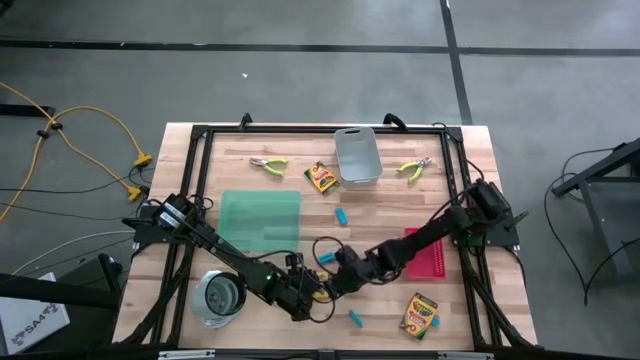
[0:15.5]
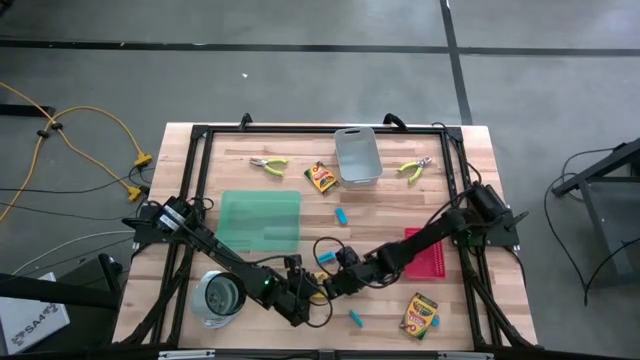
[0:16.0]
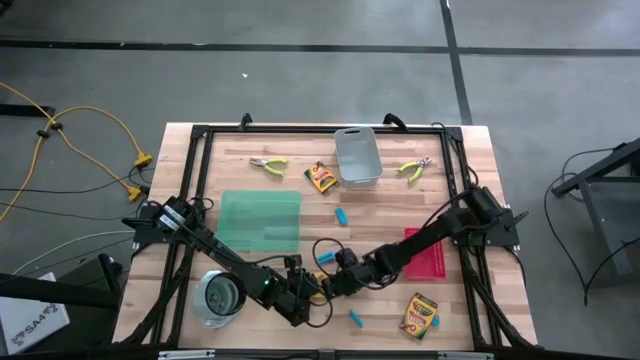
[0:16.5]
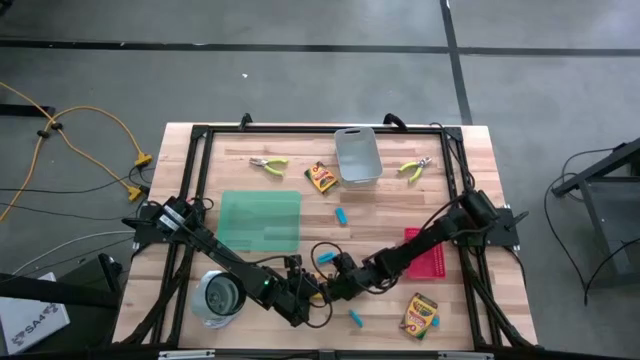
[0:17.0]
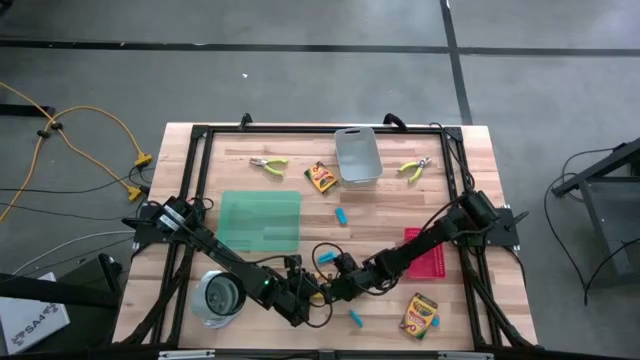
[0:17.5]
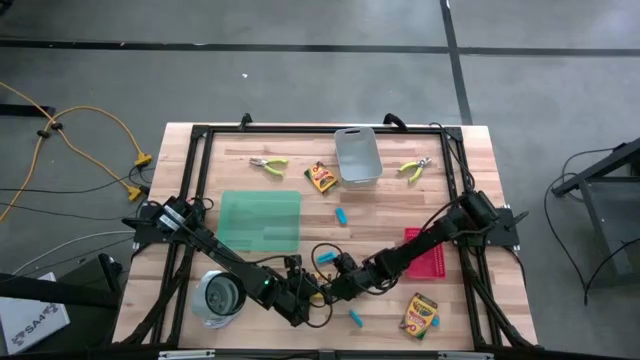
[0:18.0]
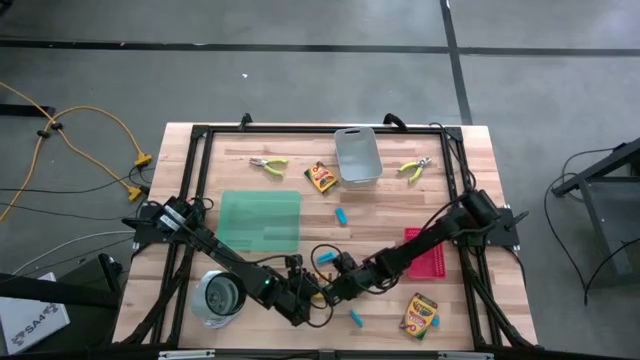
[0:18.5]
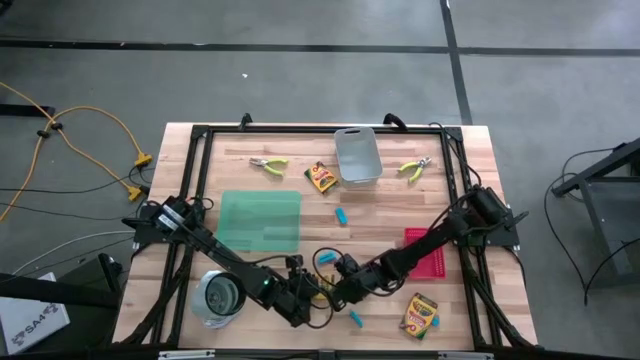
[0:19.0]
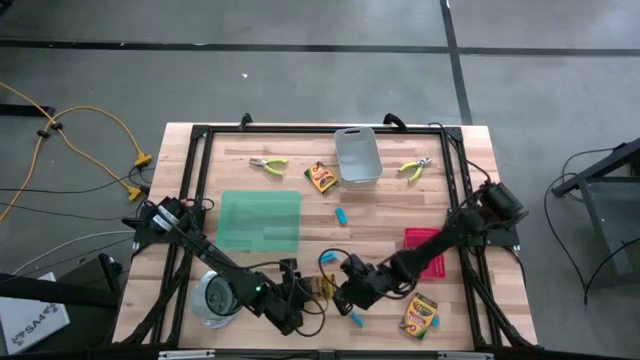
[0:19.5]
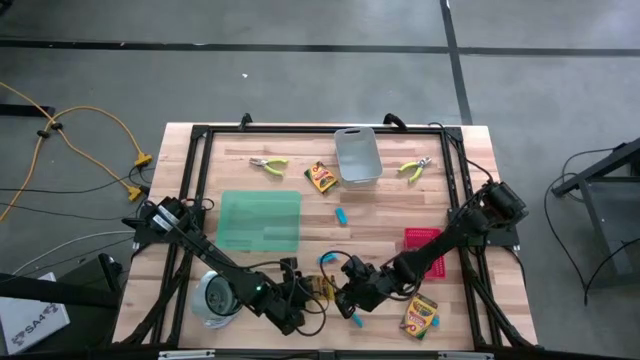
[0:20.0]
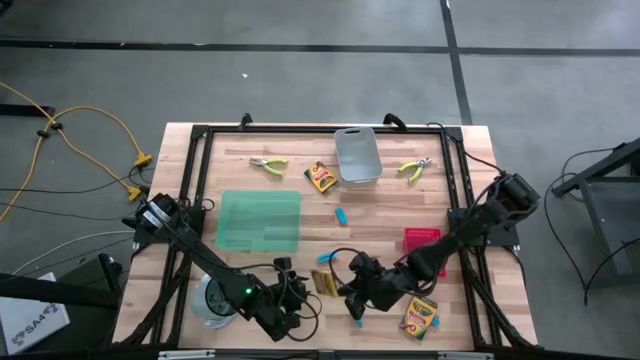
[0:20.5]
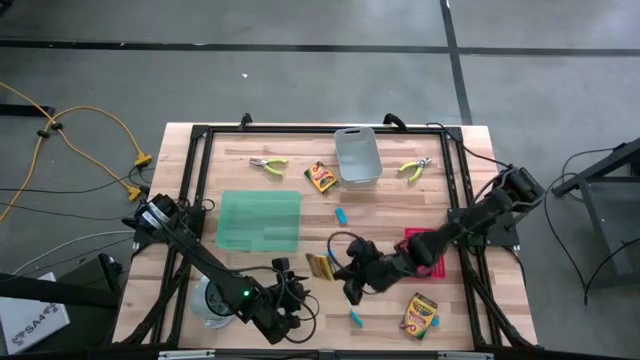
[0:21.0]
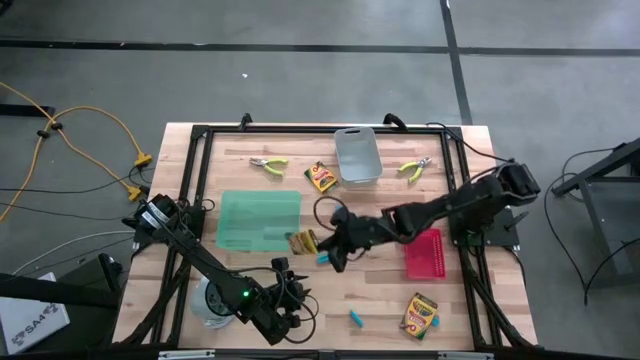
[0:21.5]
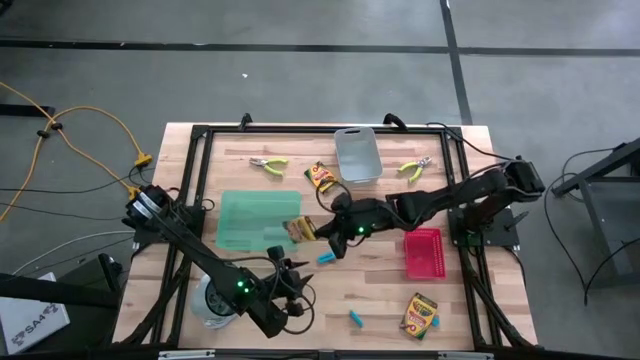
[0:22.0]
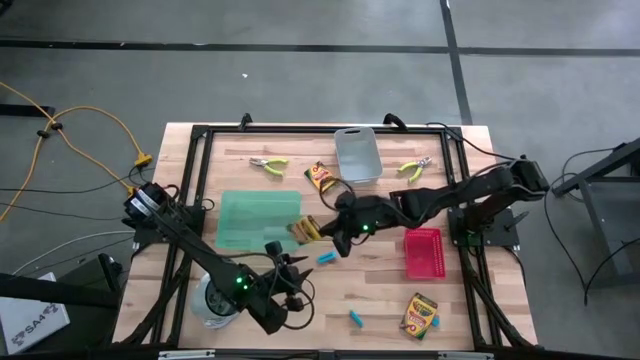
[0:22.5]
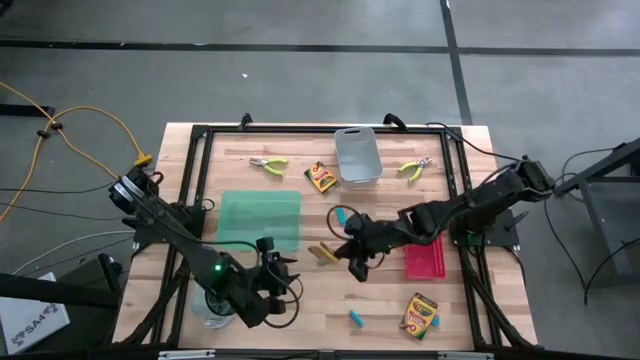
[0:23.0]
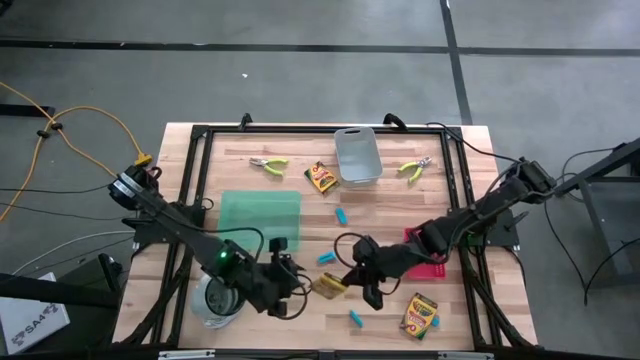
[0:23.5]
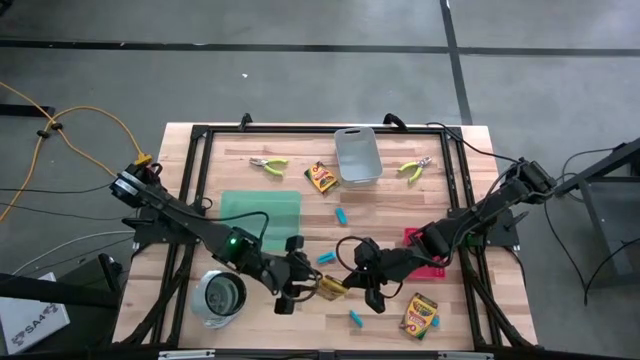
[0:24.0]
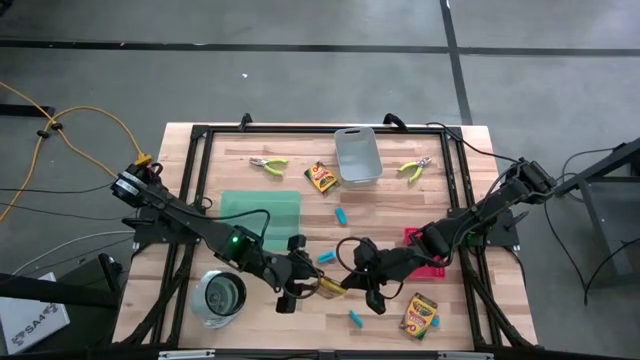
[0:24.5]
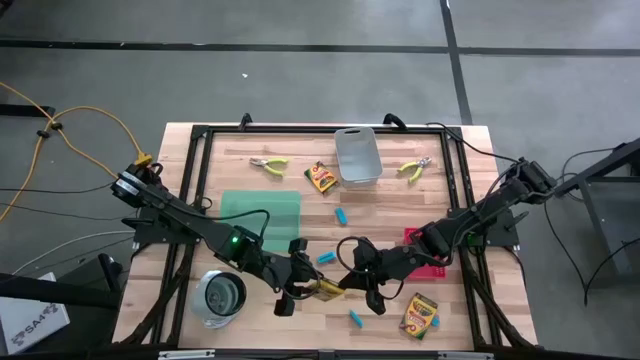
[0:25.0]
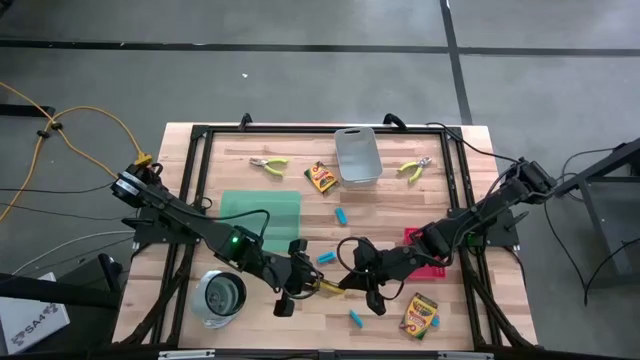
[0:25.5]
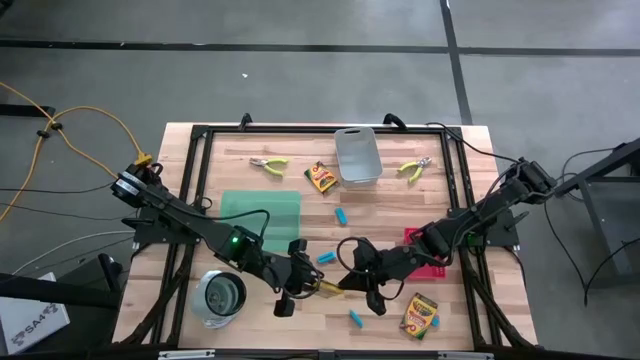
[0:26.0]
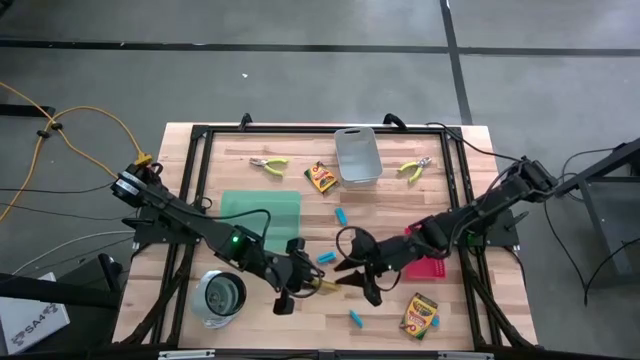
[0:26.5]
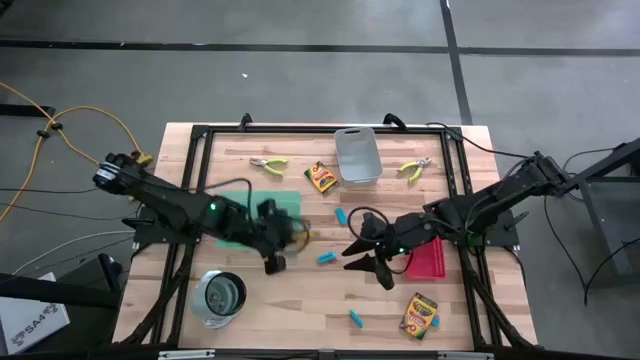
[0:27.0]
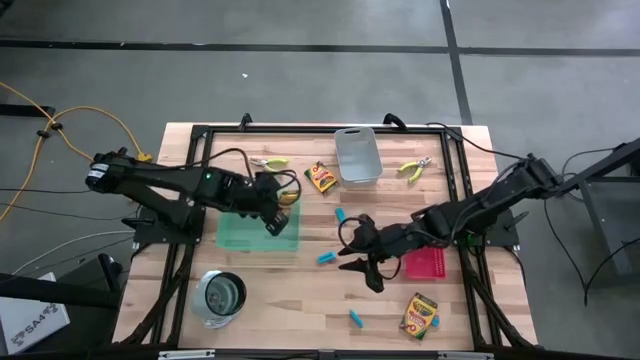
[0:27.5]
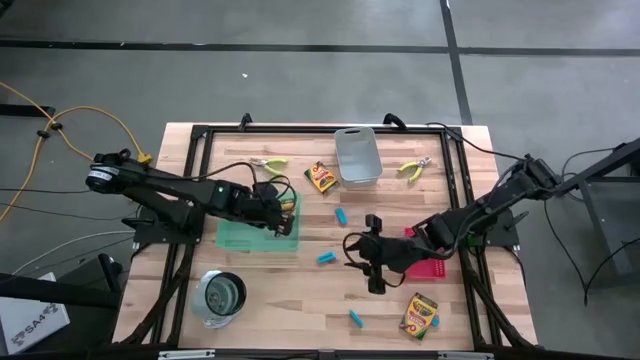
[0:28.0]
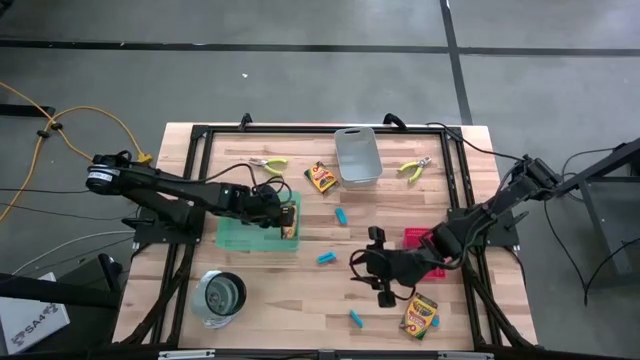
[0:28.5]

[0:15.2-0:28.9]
Task: Pick & Place School Supplies
Put the crayon box into the green bin

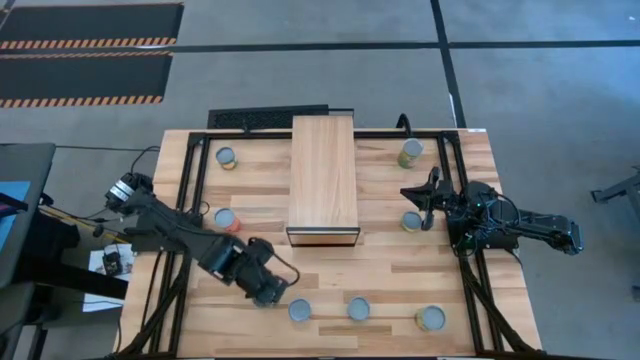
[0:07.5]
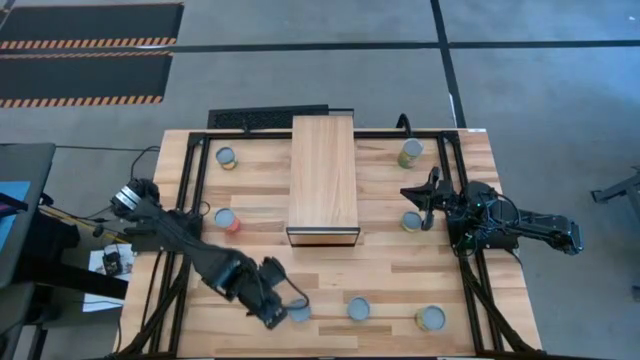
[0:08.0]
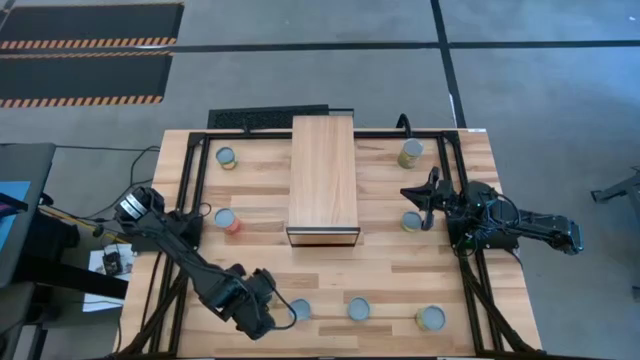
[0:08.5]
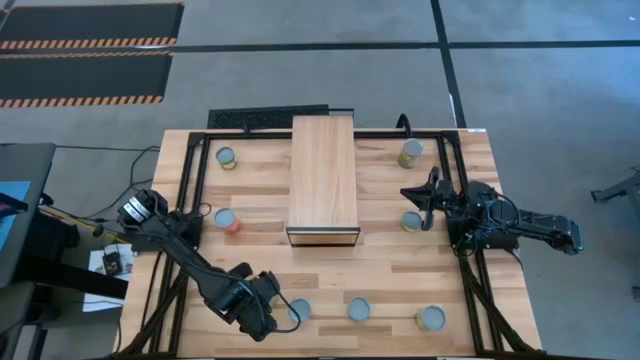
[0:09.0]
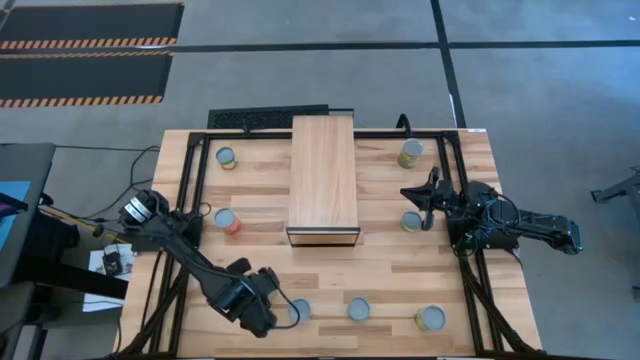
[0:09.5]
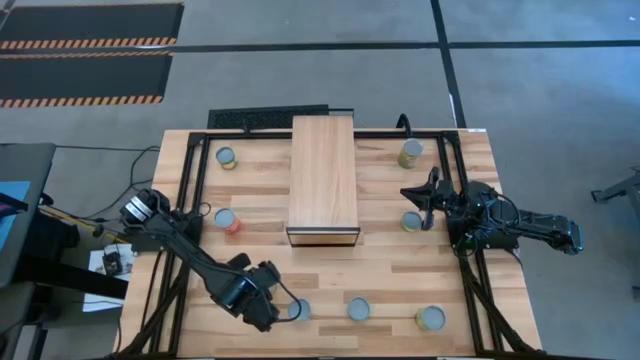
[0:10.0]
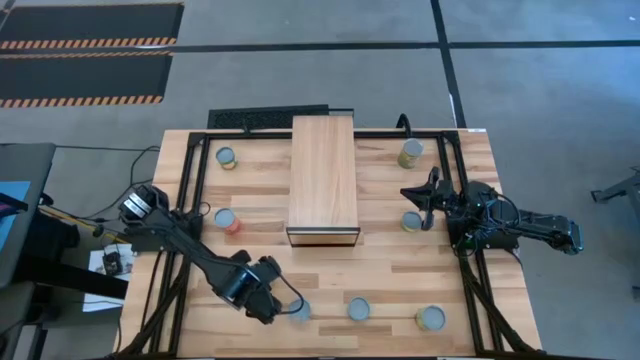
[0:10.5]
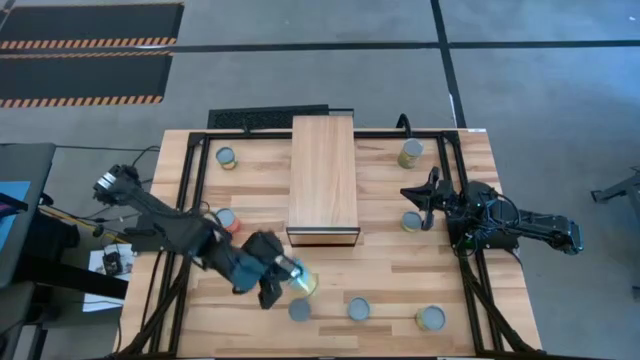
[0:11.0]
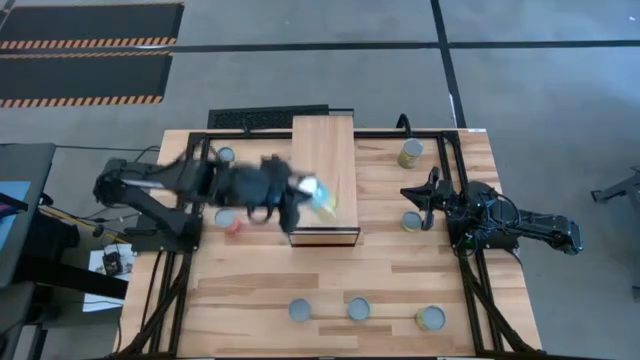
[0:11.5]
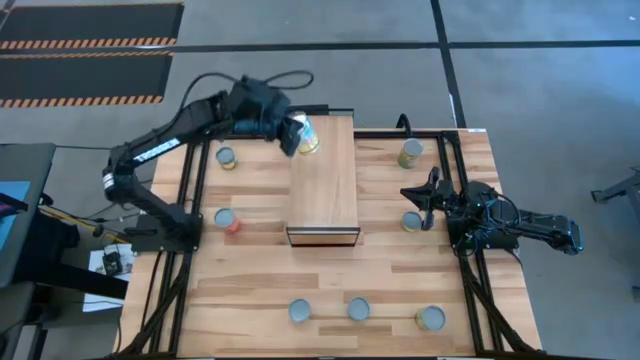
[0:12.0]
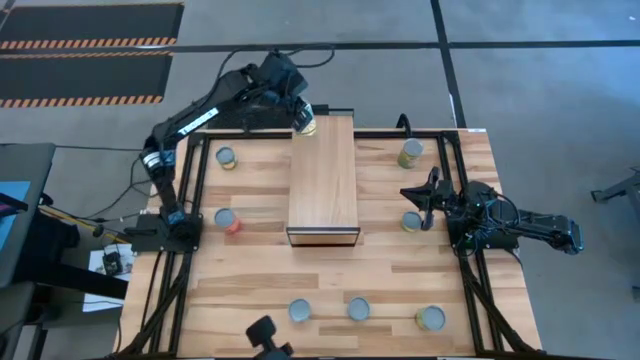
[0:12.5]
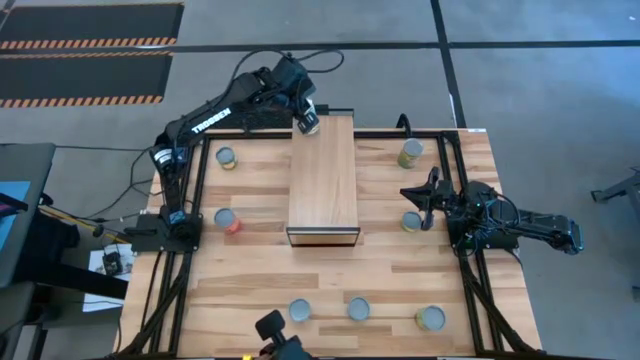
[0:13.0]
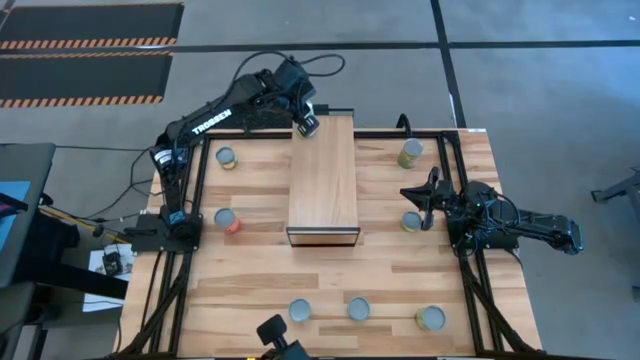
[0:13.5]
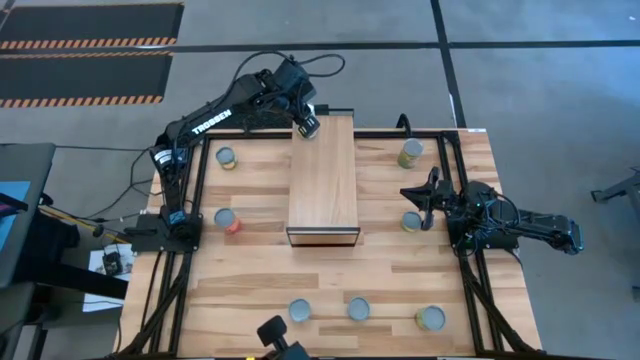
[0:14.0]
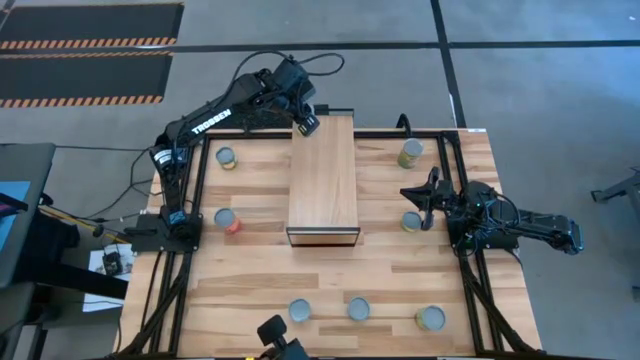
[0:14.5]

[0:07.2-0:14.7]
Task: Pick and place cans onto a shelf
Put the canned carrots on the shelf
